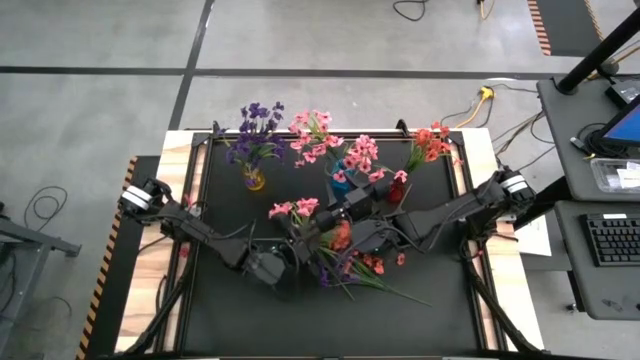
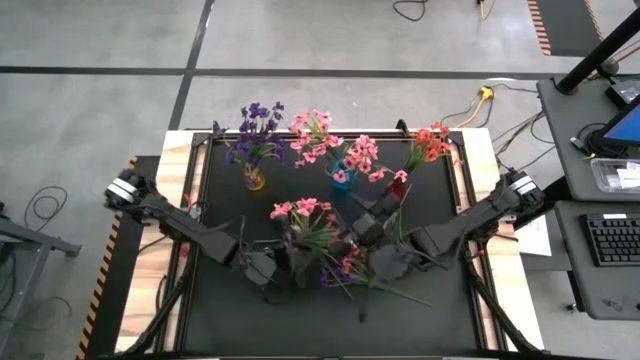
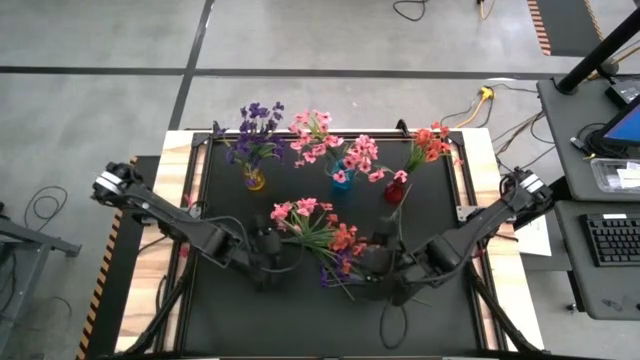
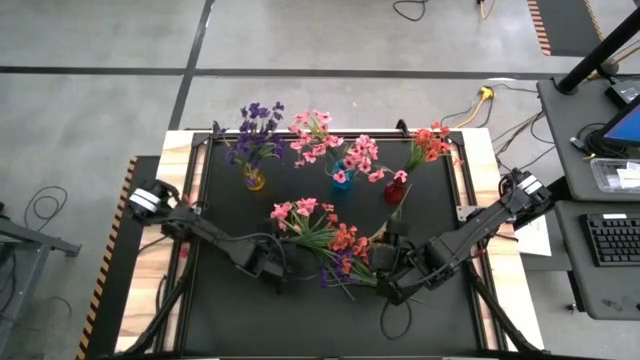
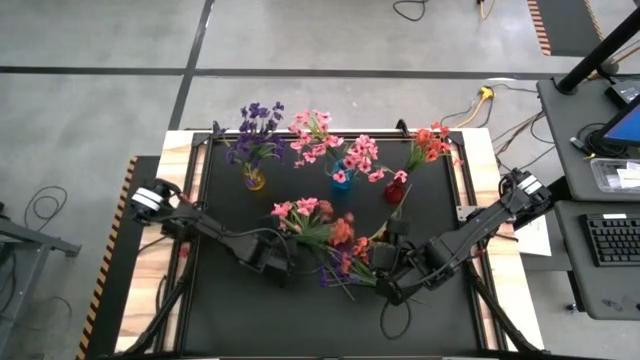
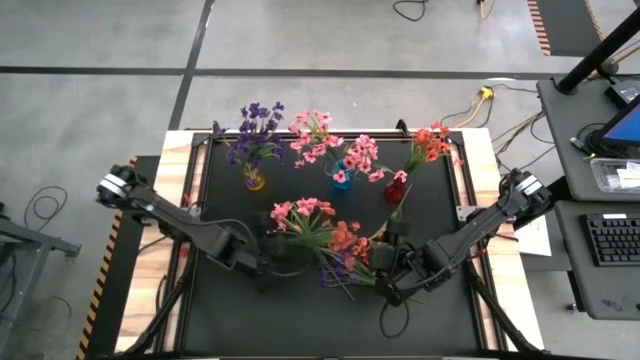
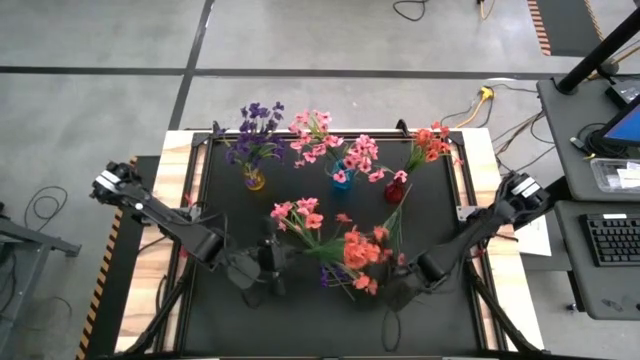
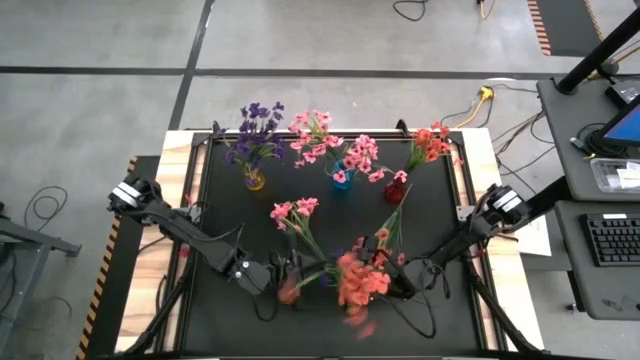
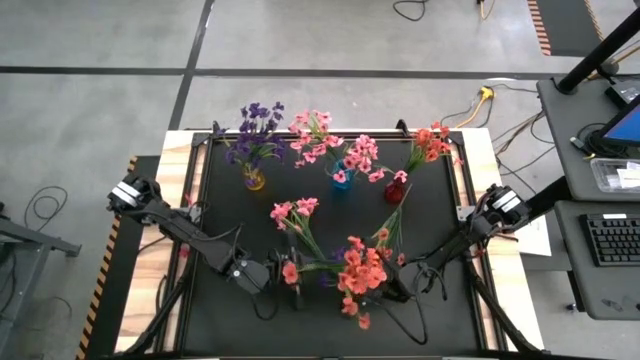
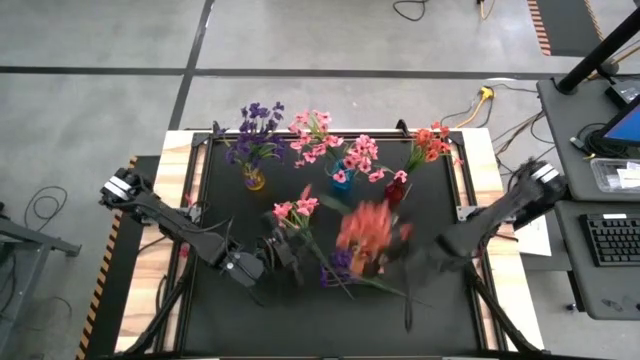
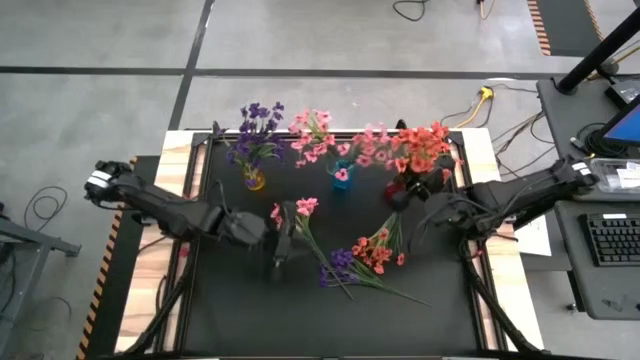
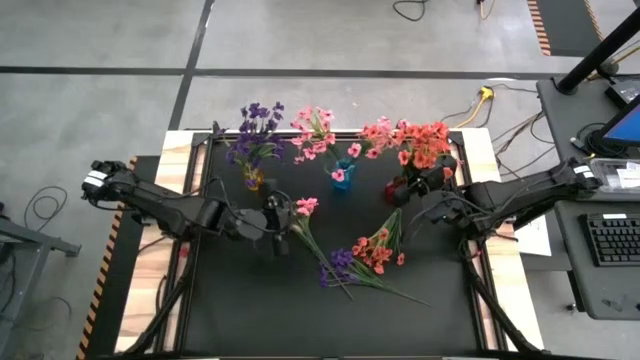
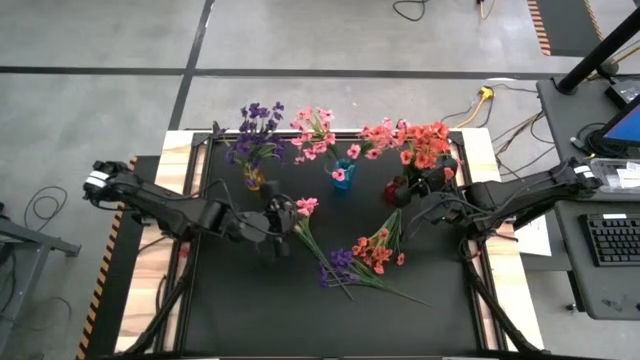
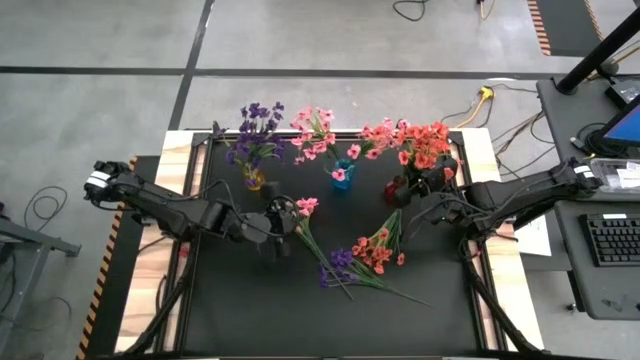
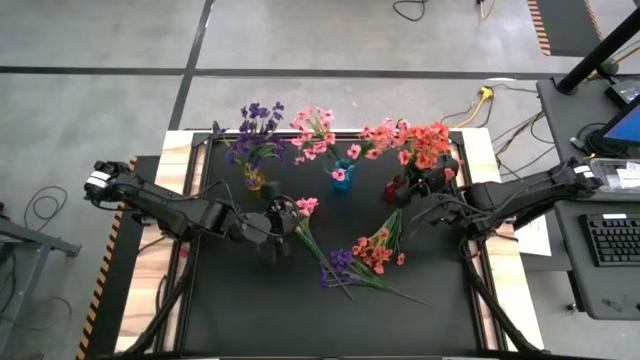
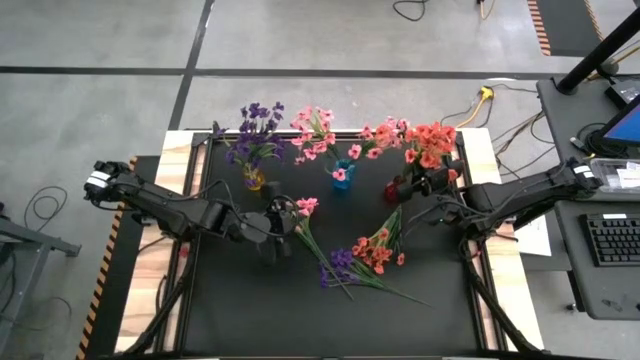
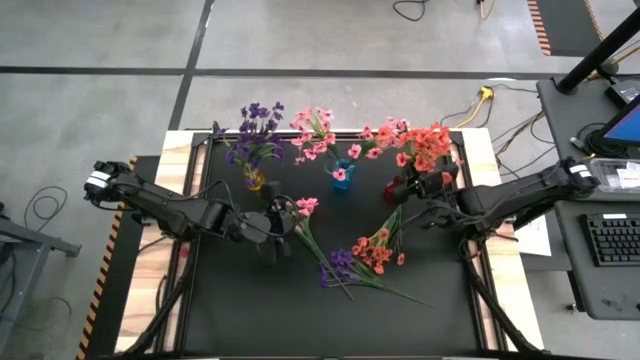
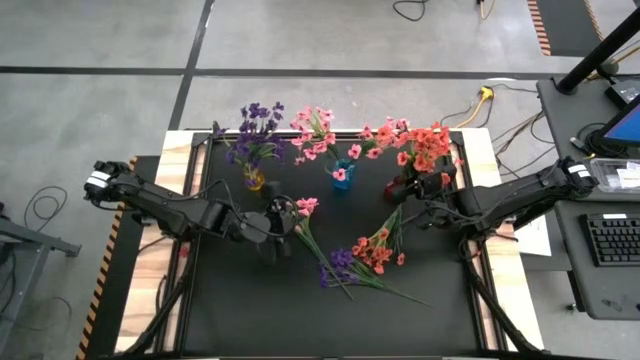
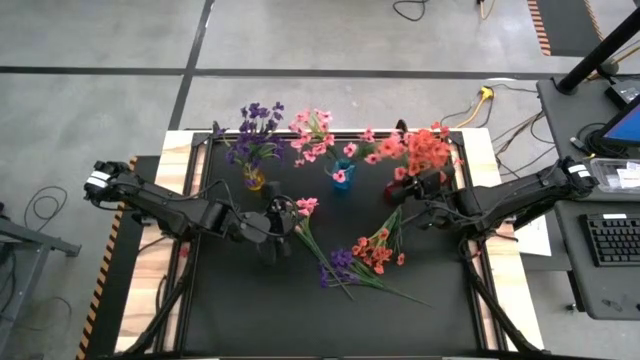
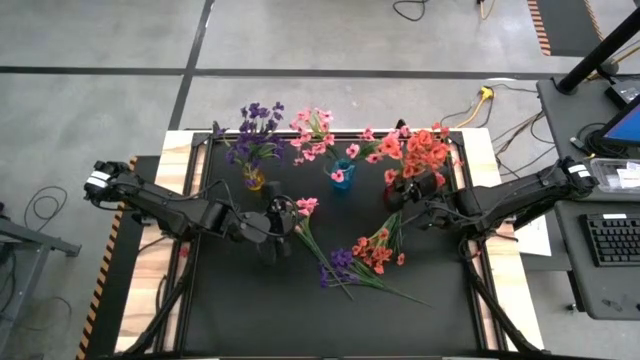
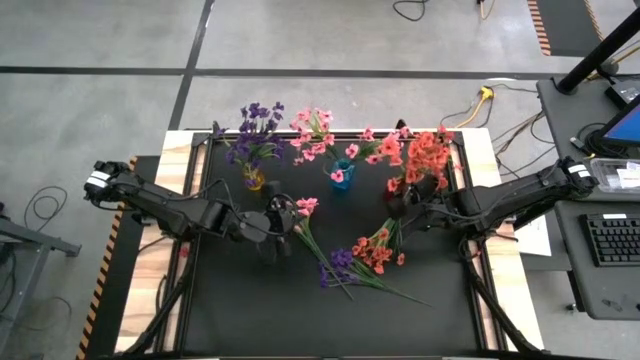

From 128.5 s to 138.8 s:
Task: Sort flowers into vase by color
Put the left orange flower into the red vase

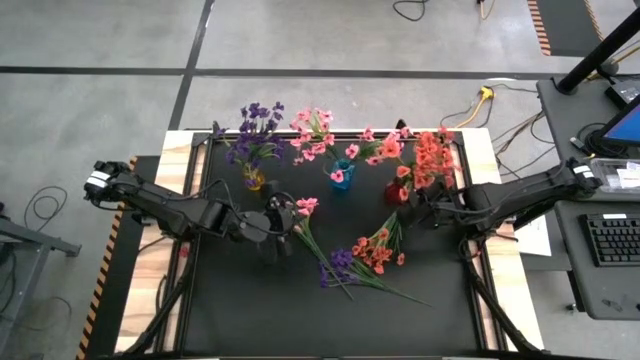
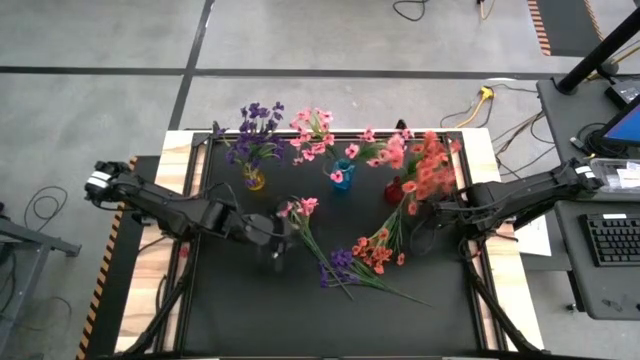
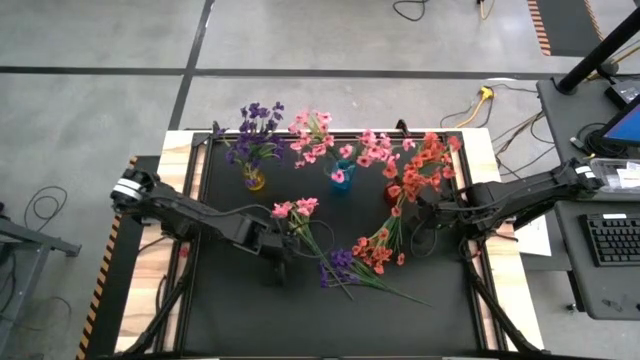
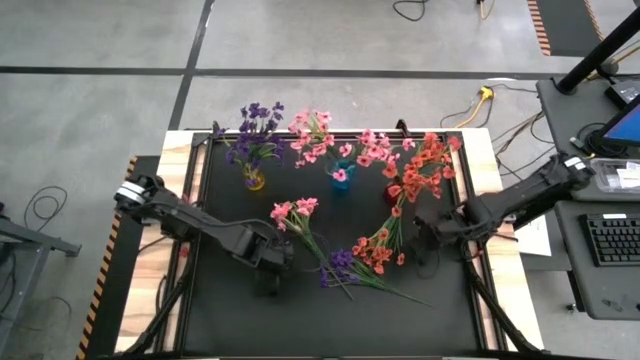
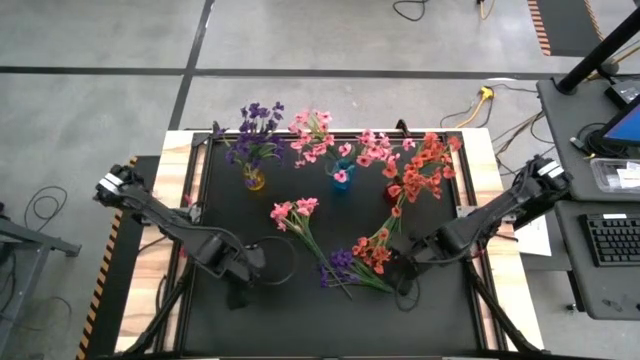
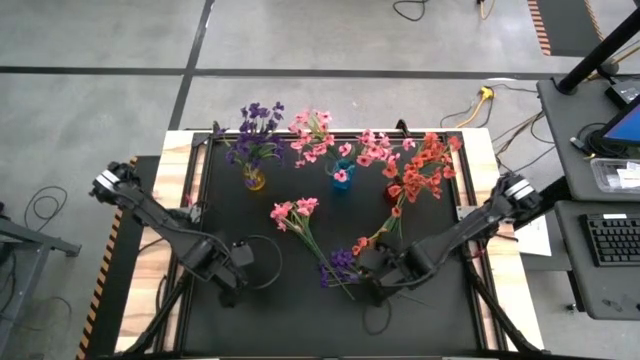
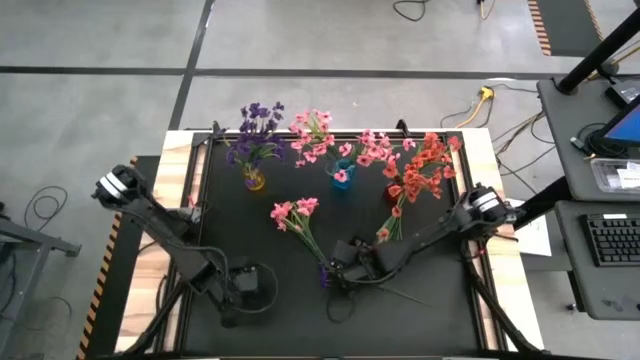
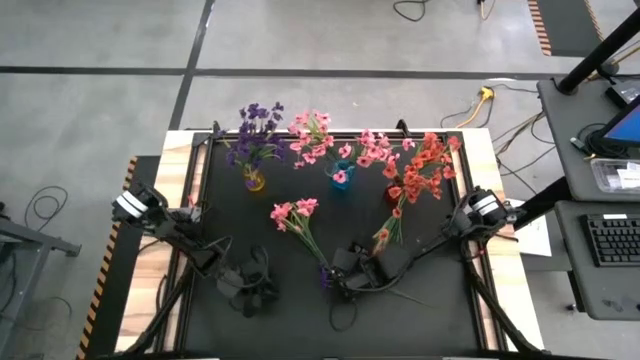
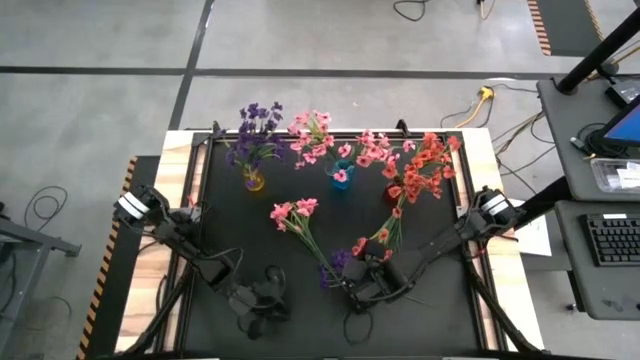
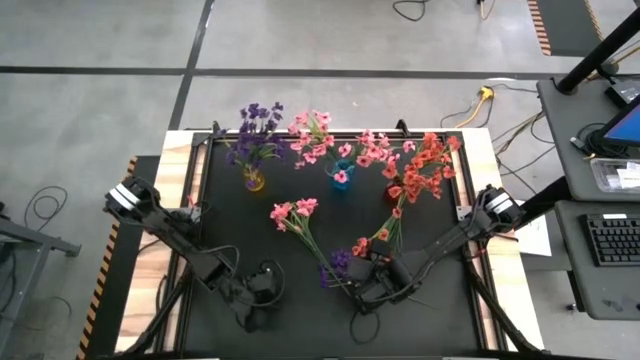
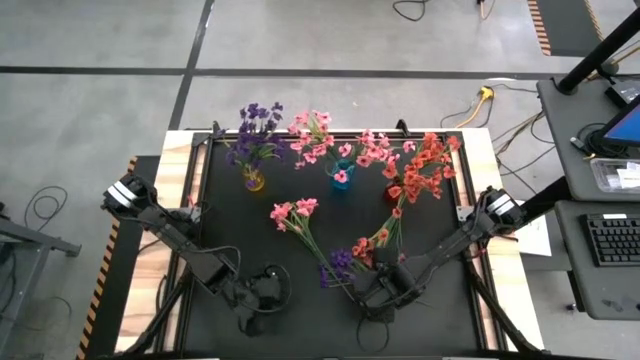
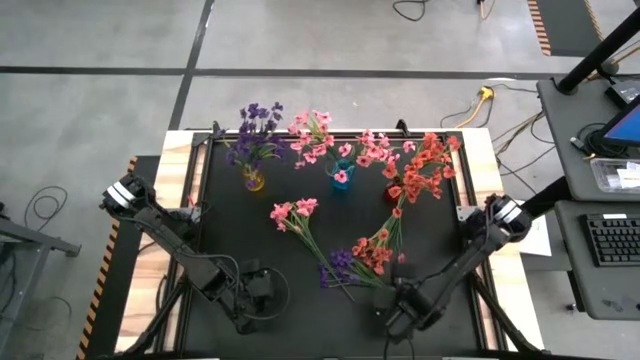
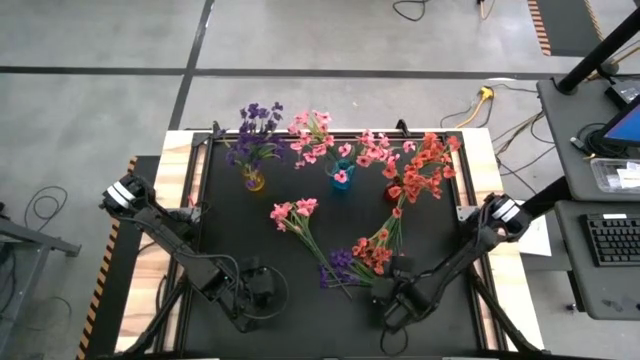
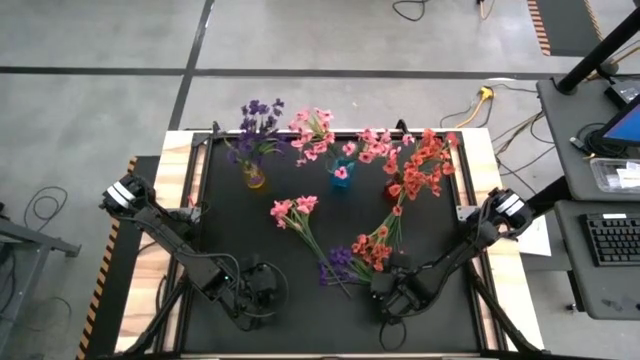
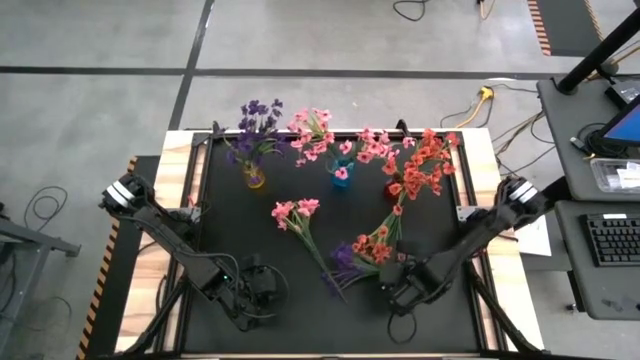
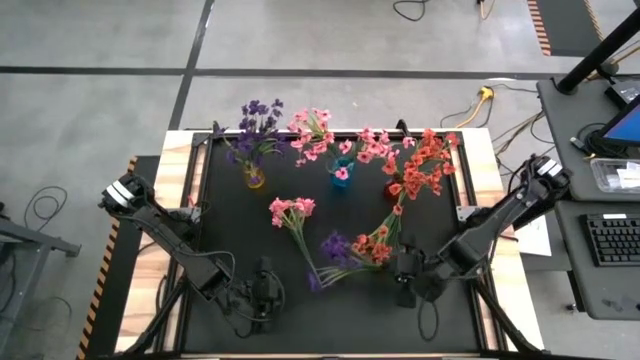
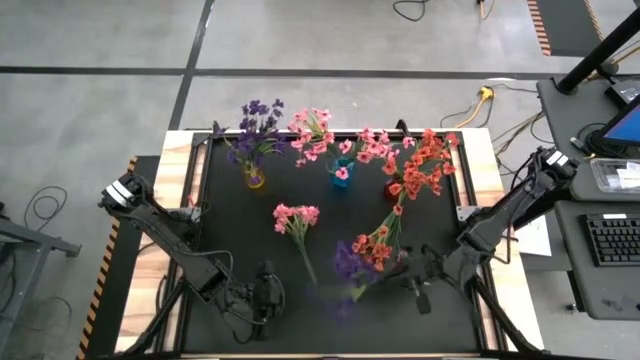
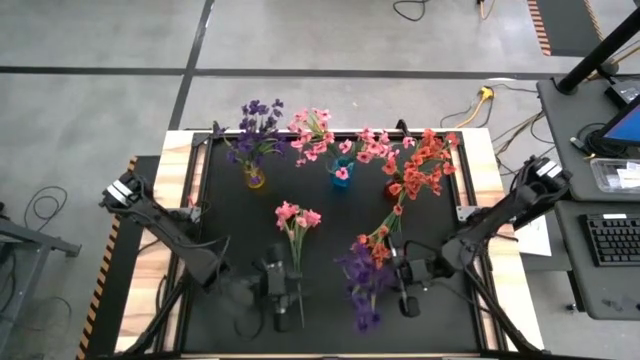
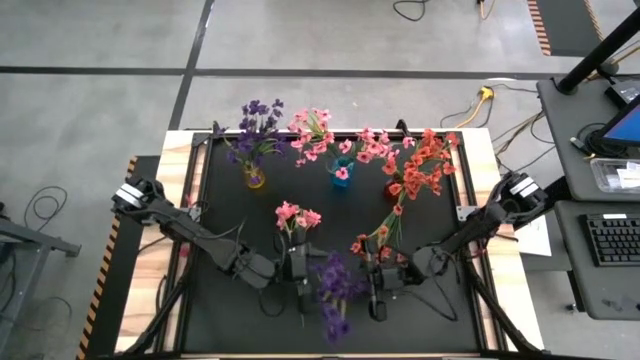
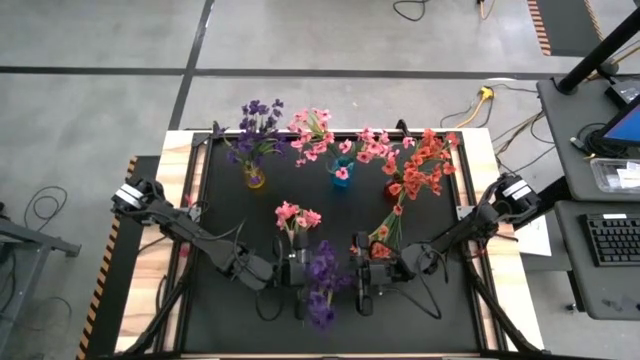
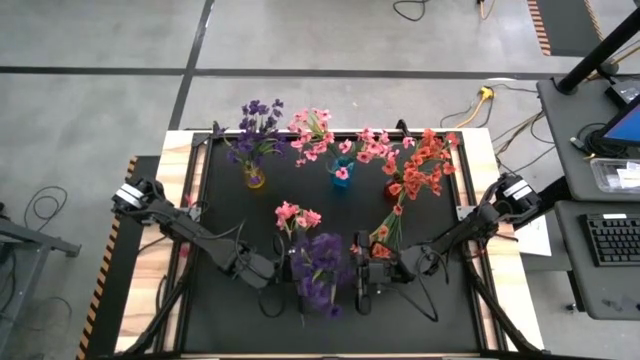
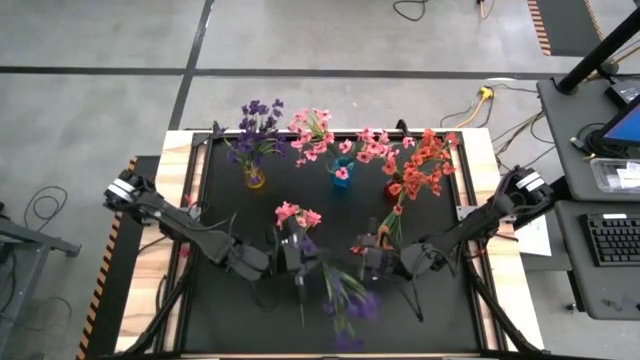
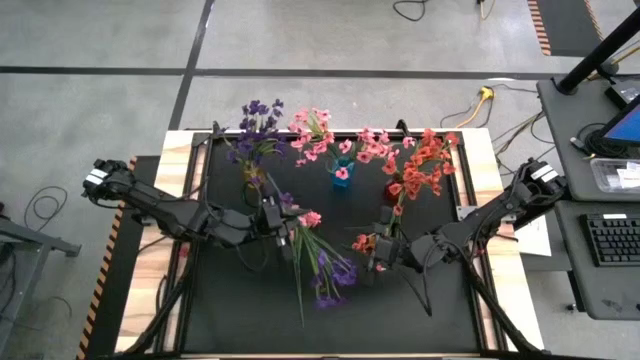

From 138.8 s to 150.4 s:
Put the purple flower into the yellow vase
